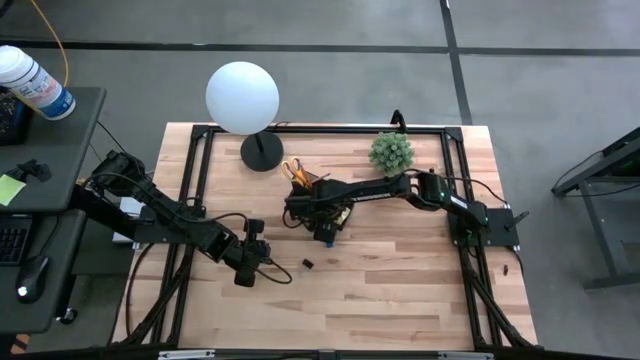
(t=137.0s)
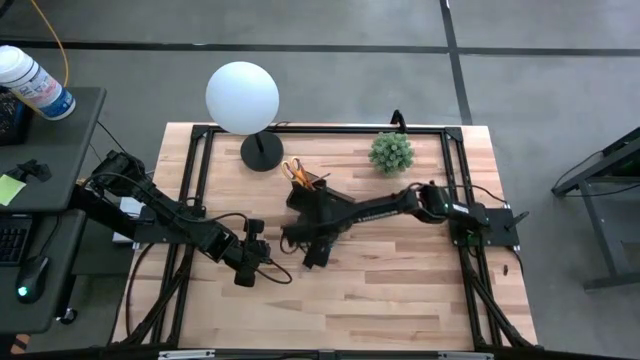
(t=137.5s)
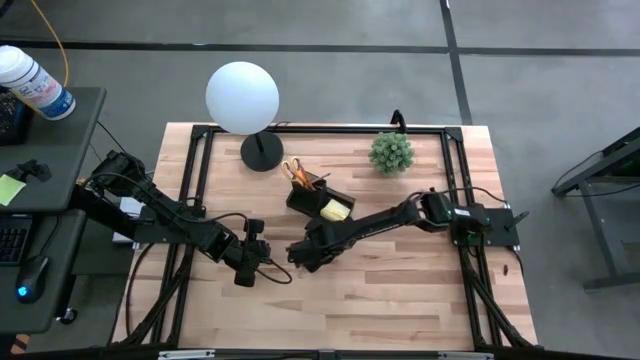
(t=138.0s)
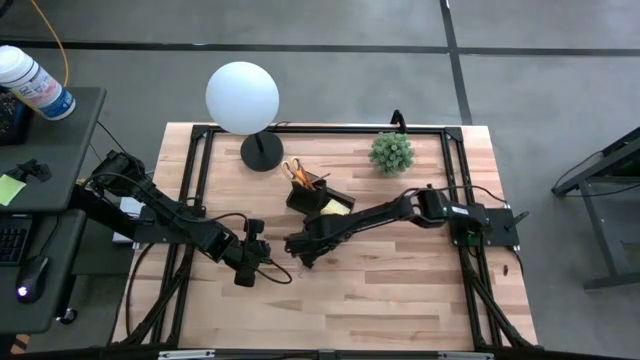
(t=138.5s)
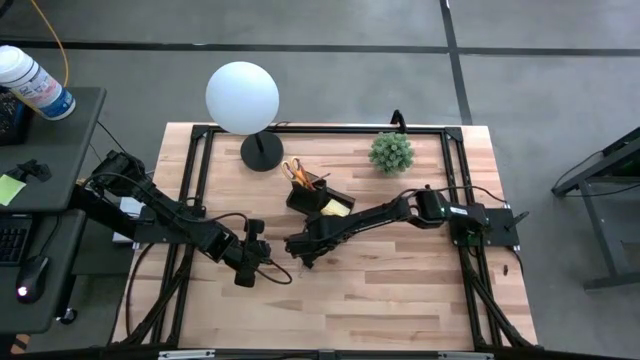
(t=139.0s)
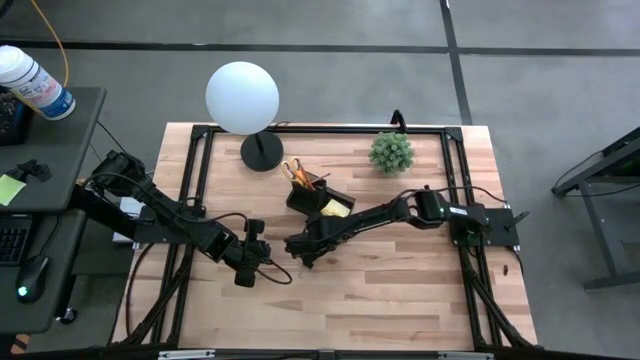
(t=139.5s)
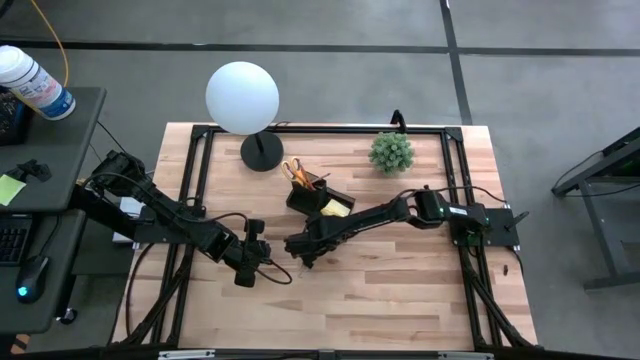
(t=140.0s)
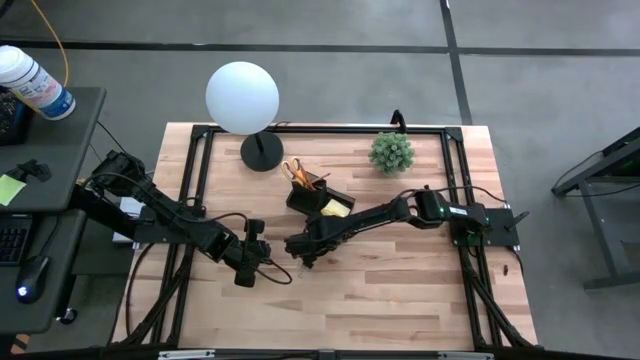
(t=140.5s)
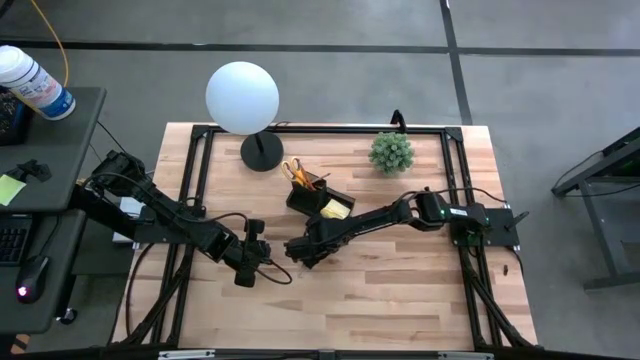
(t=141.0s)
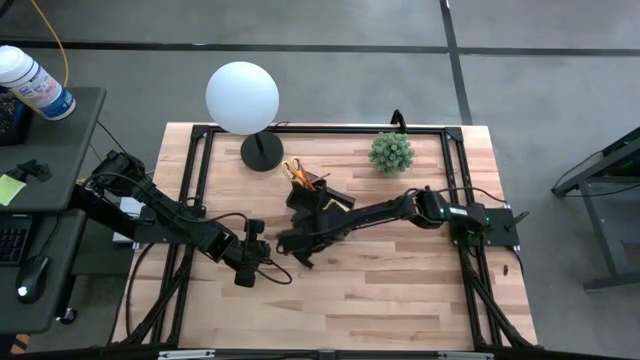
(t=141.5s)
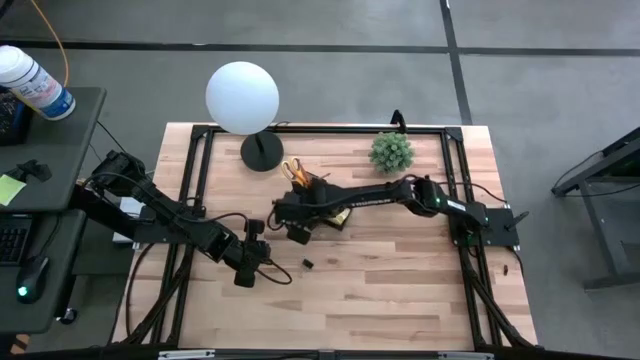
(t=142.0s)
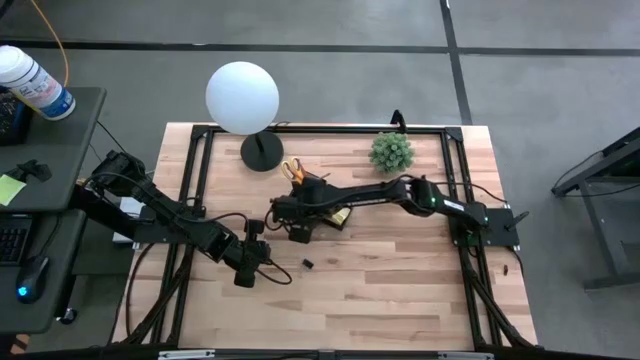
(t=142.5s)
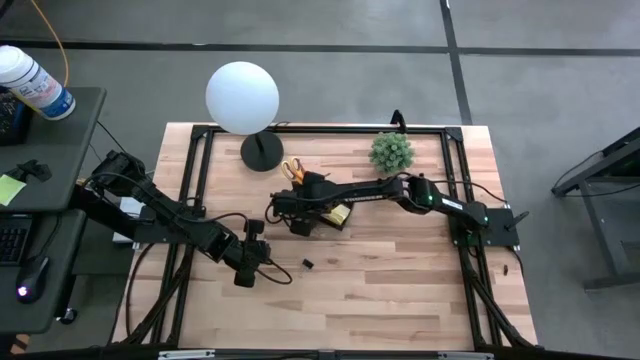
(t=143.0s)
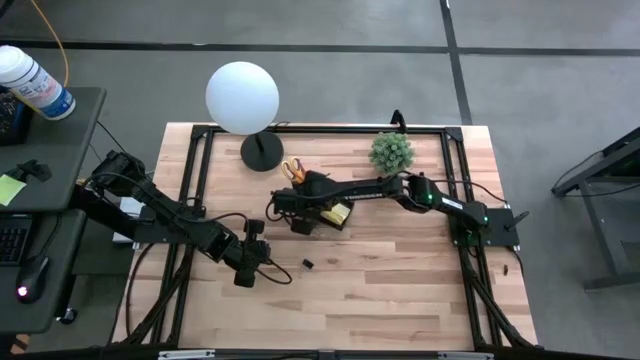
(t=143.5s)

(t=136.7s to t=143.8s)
Task: Pick and place office supplies into organizer
Put the blue eraser into the black organizer

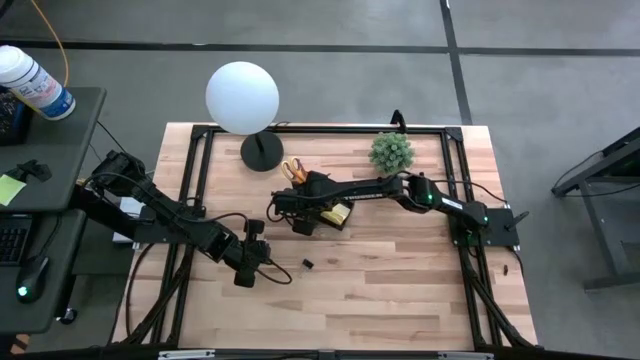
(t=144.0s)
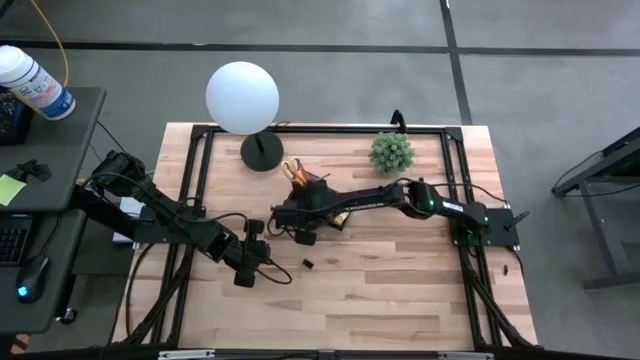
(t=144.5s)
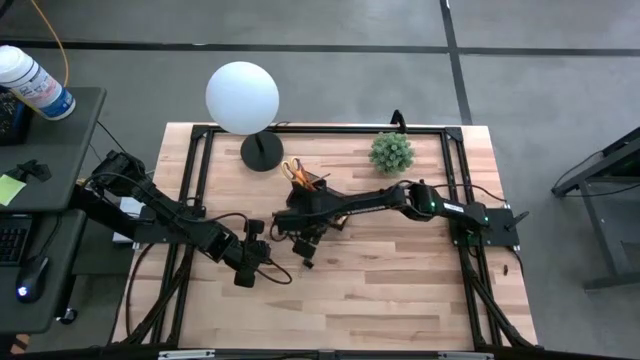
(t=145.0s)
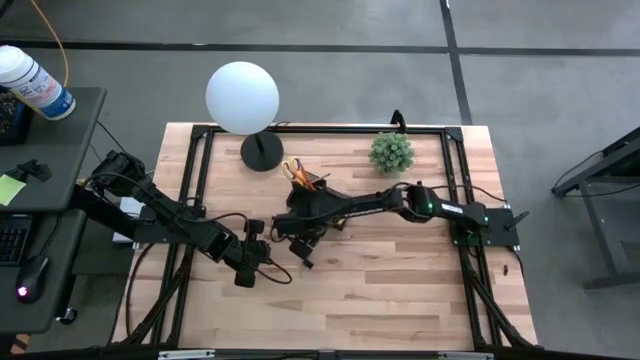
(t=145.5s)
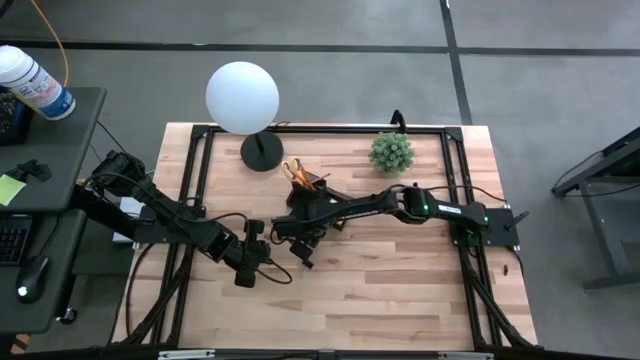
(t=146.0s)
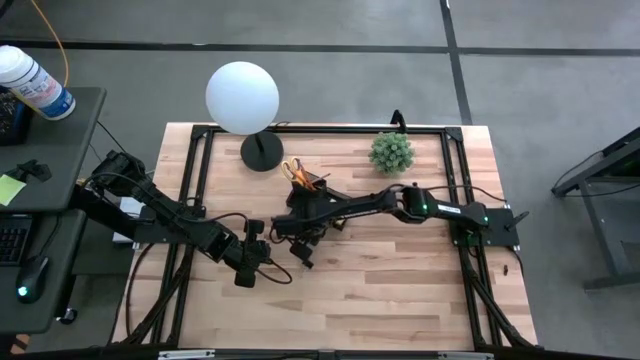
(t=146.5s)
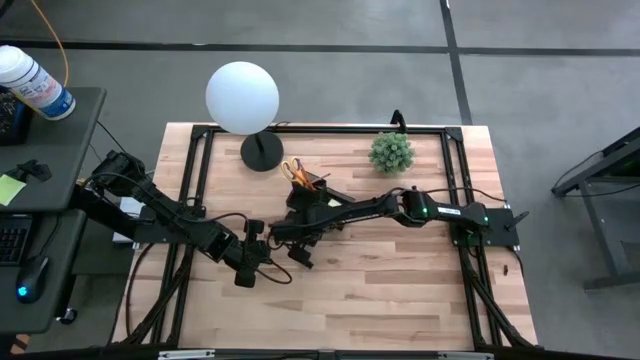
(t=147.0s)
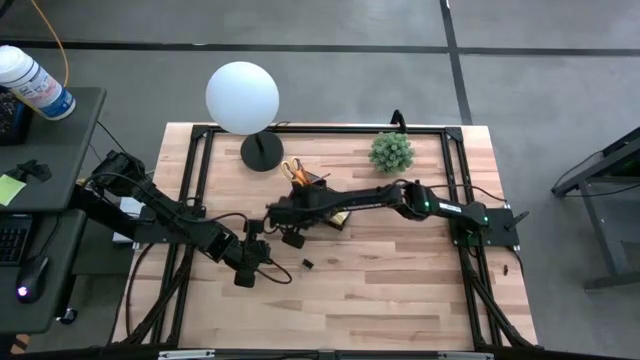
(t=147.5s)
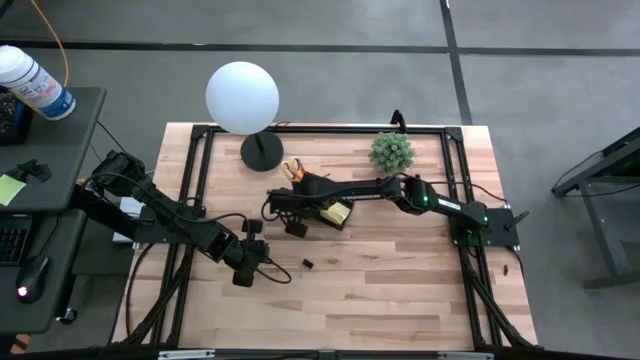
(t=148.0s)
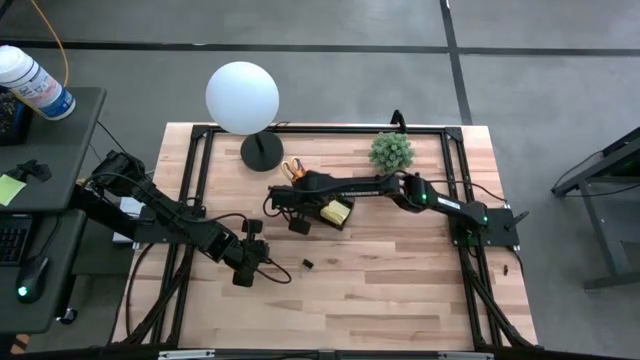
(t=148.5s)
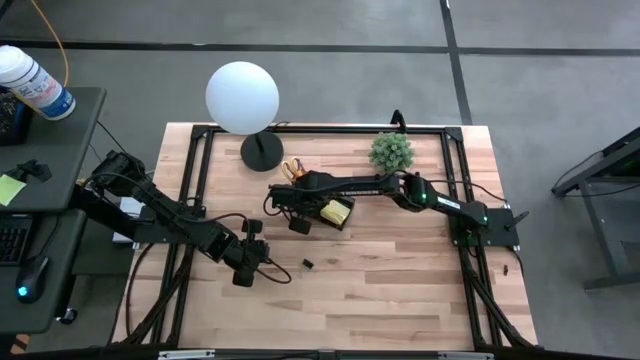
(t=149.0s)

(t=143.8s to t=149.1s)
Put the top black binder clip into the black organizer

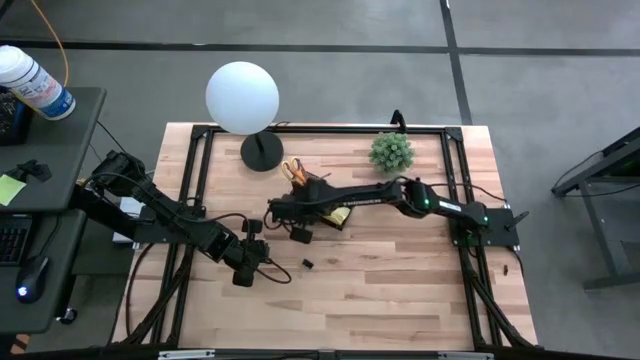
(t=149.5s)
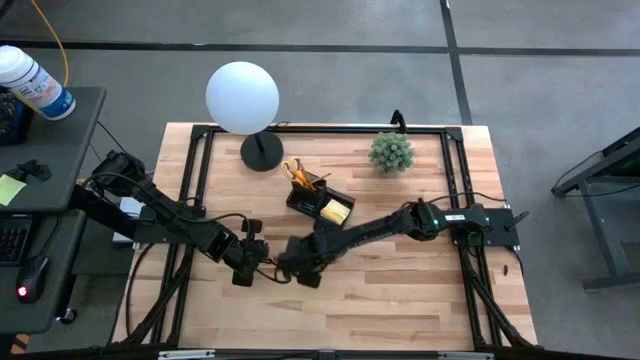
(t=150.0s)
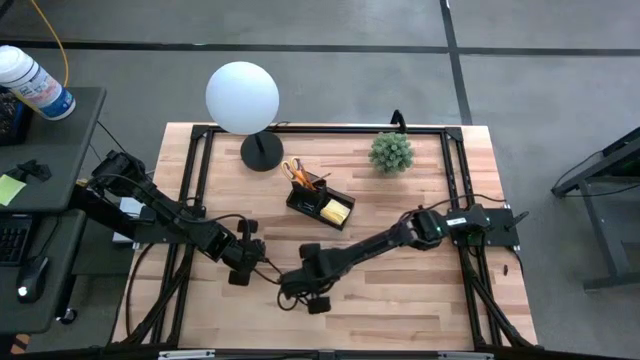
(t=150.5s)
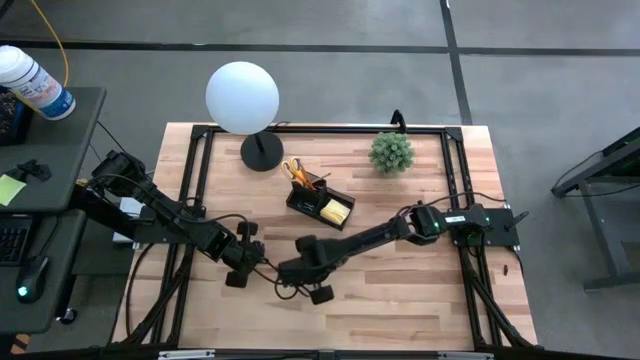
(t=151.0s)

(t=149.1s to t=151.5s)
Put the black binder clip into the black organizer

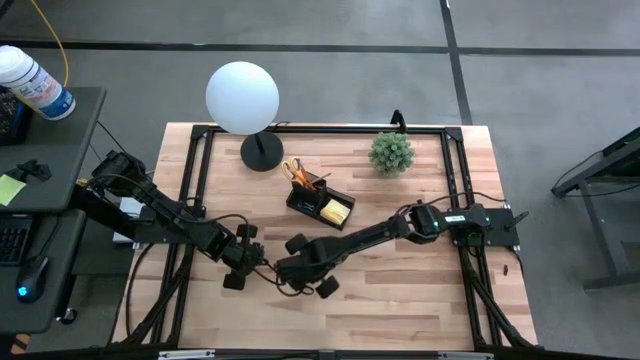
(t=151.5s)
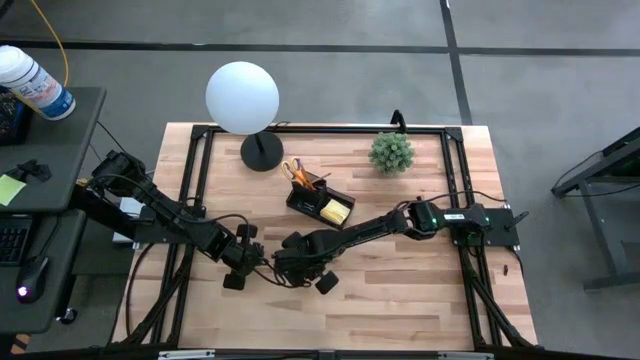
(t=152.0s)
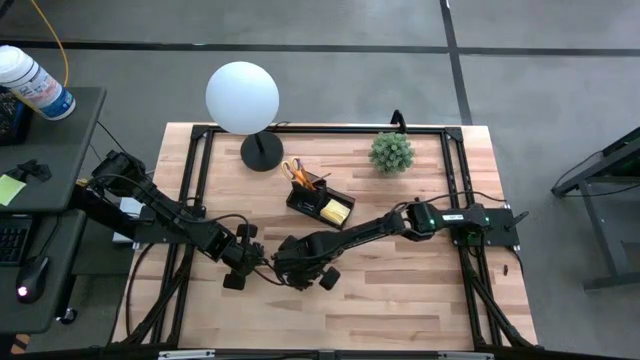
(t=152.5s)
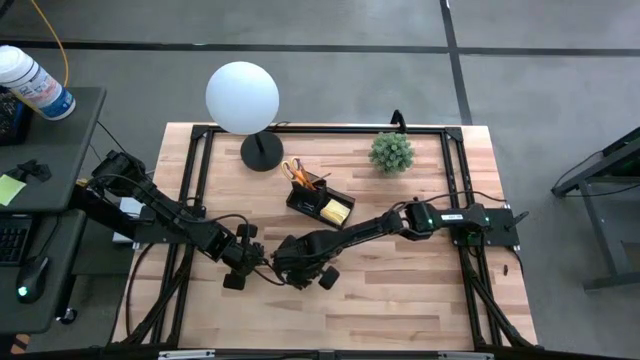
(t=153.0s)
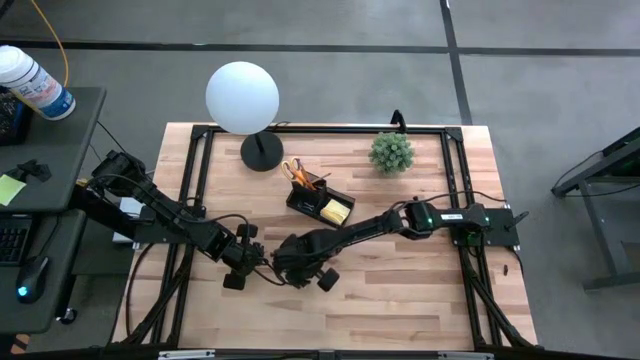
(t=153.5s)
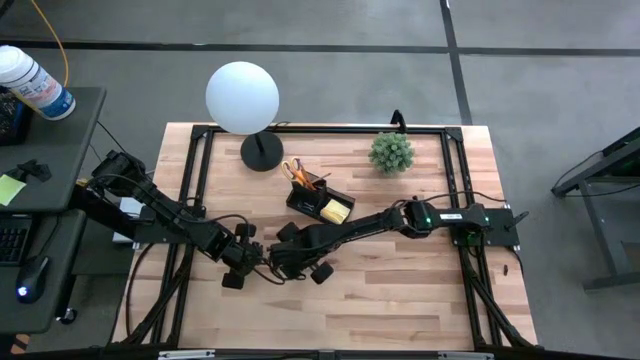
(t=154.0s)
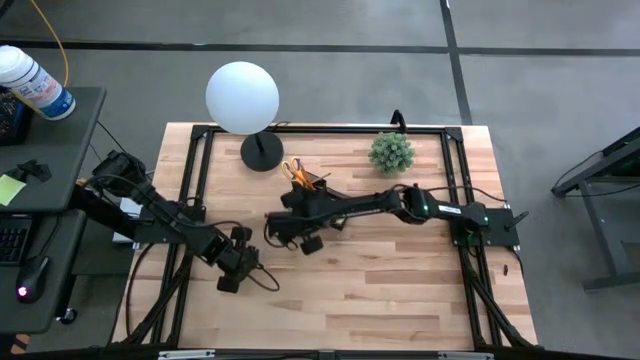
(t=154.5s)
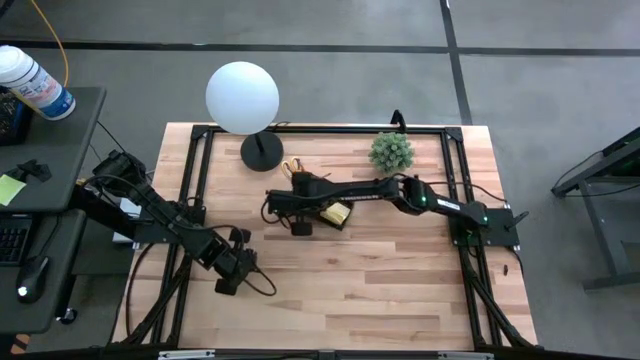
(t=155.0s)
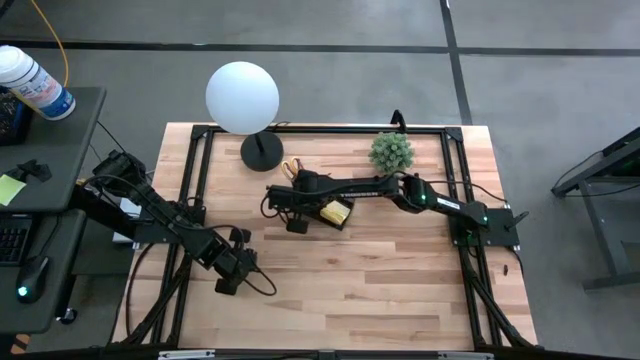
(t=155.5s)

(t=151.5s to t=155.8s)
Put the black binder clip into the black organizer

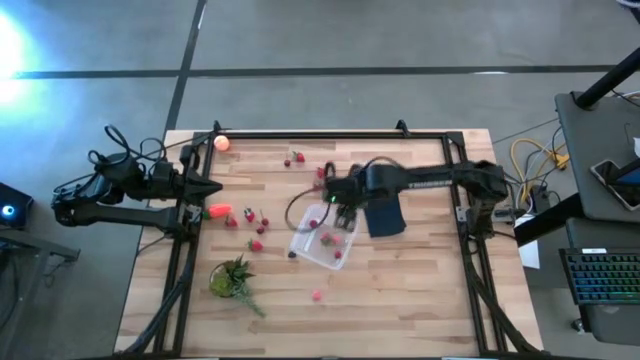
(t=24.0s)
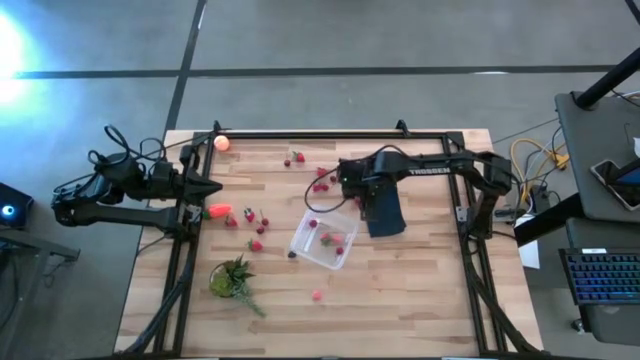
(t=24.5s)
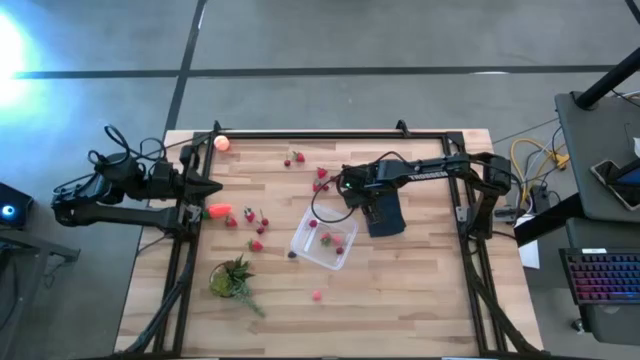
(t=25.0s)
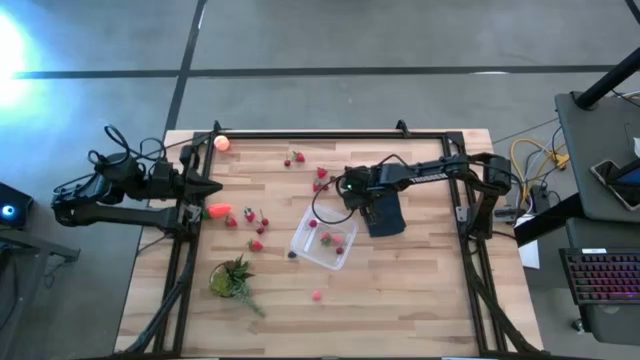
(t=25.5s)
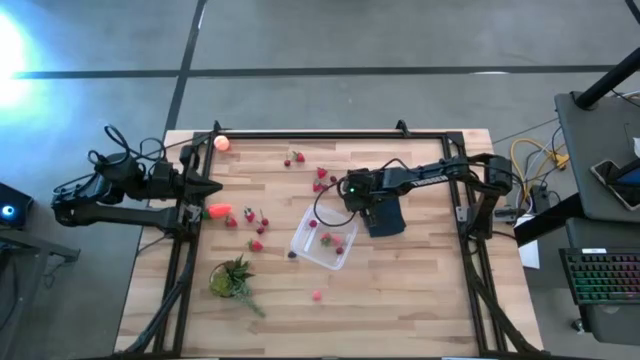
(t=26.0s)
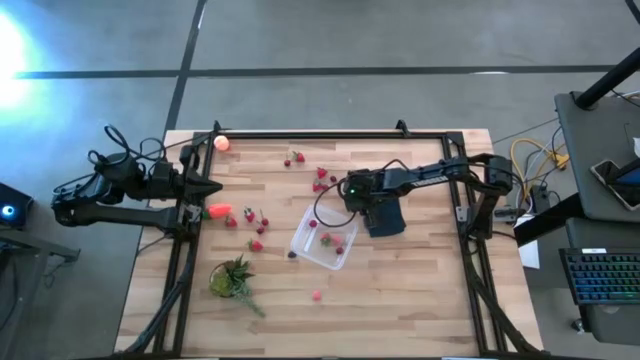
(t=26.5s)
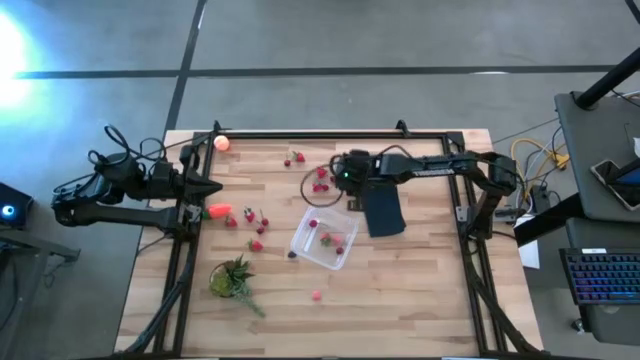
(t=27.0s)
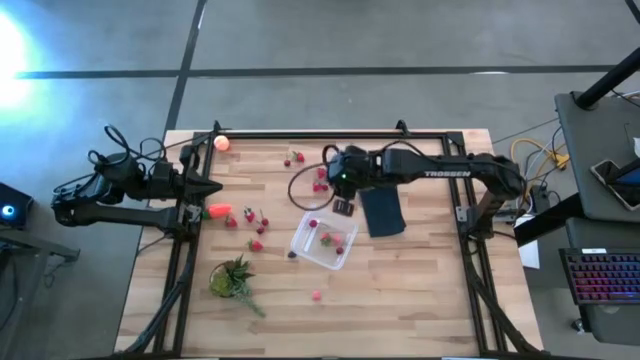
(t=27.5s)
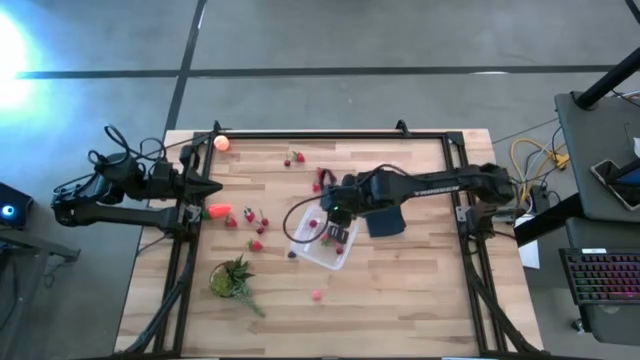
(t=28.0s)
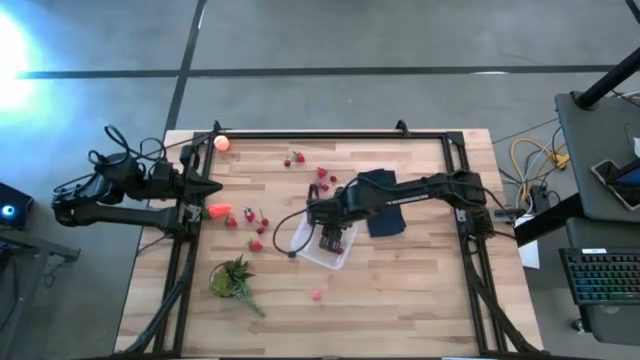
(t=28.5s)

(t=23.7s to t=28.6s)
Task: Pick and placing Produce into tupperware
Put the red cherry into the transparent bin
